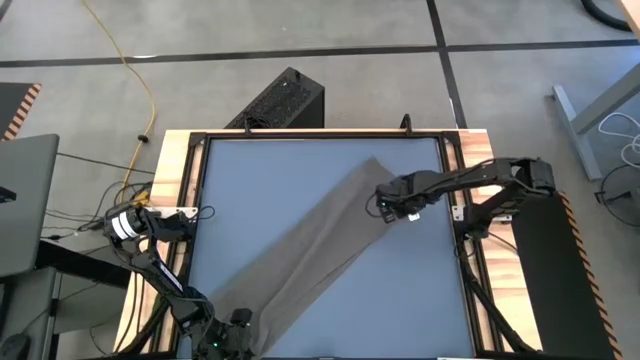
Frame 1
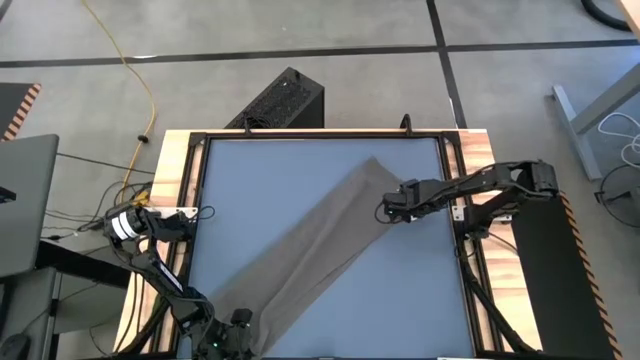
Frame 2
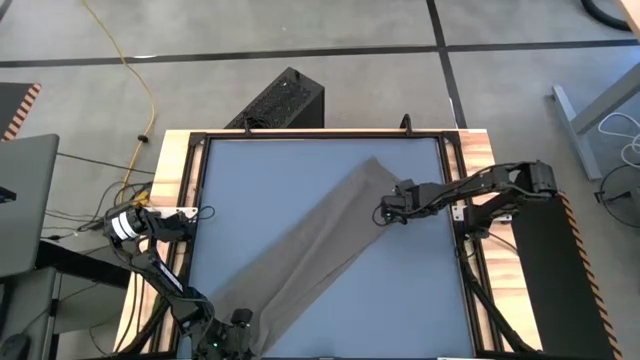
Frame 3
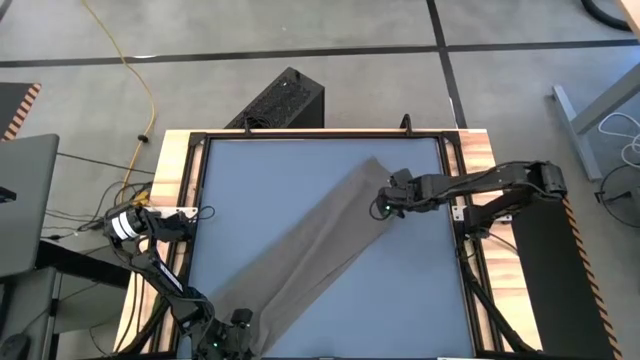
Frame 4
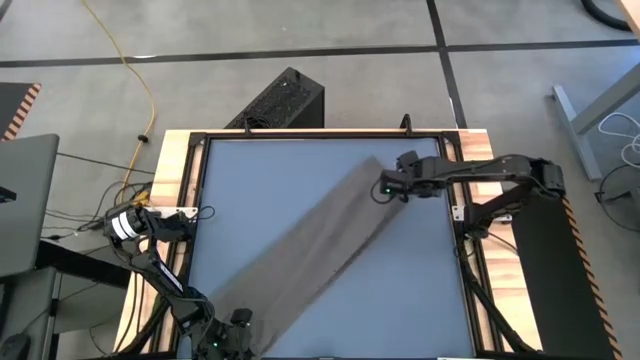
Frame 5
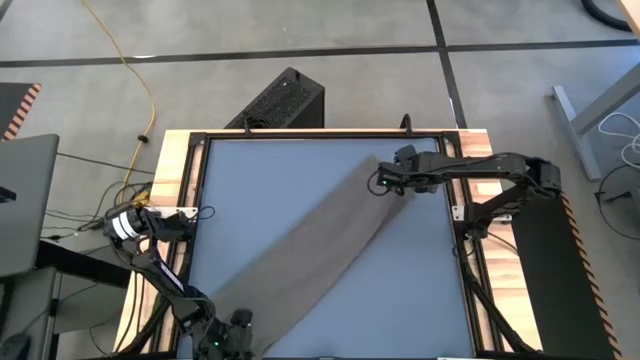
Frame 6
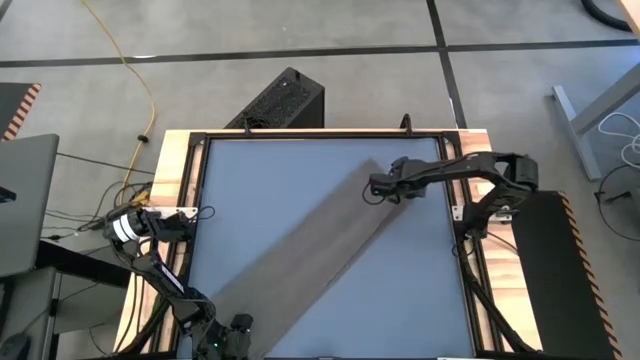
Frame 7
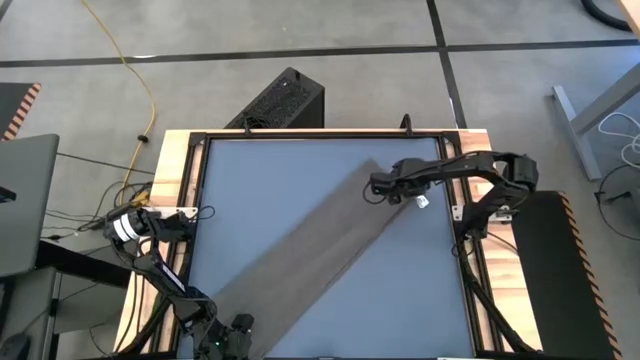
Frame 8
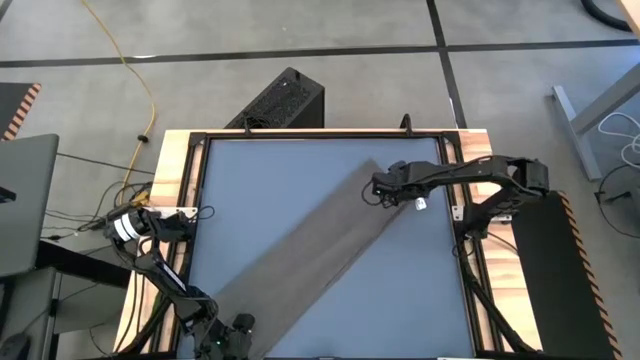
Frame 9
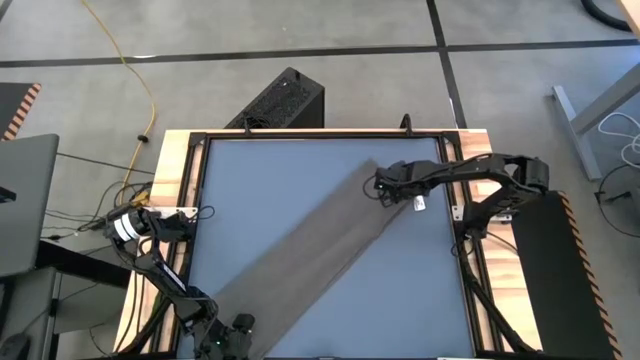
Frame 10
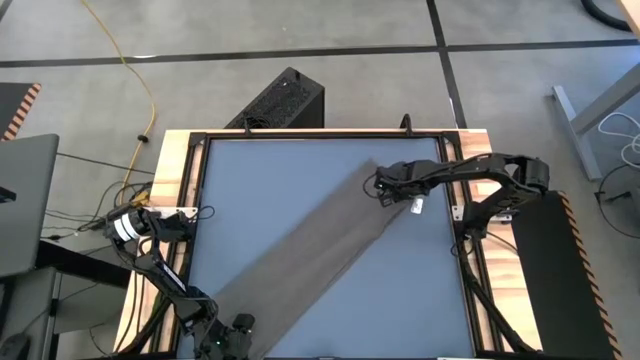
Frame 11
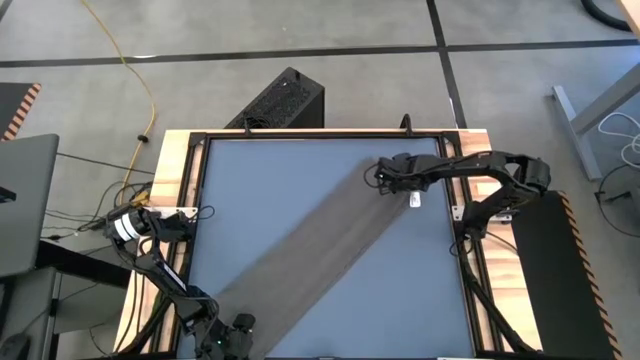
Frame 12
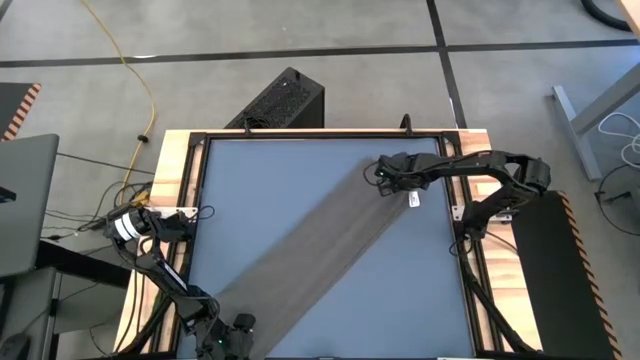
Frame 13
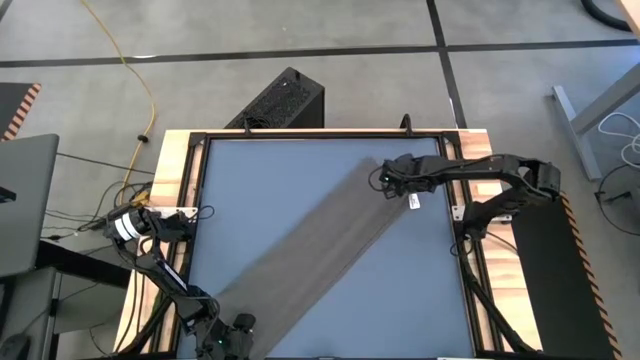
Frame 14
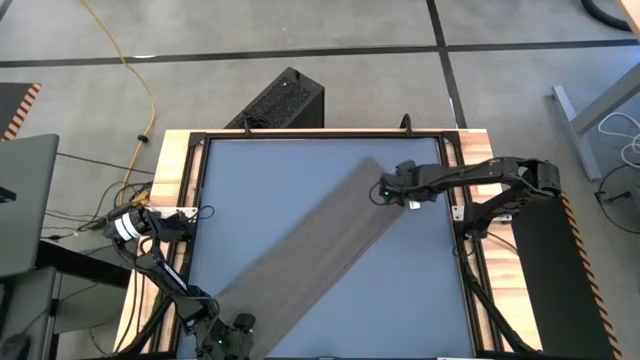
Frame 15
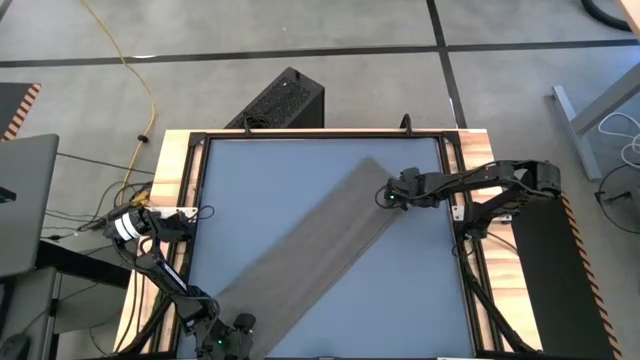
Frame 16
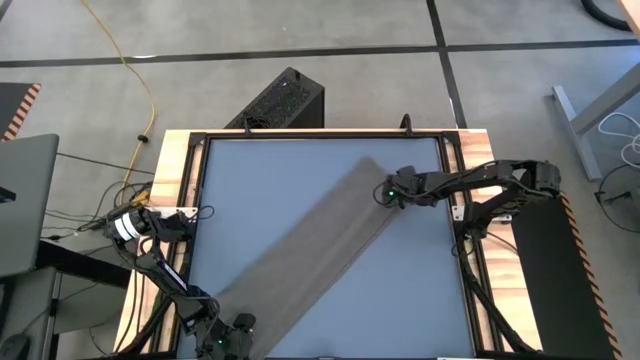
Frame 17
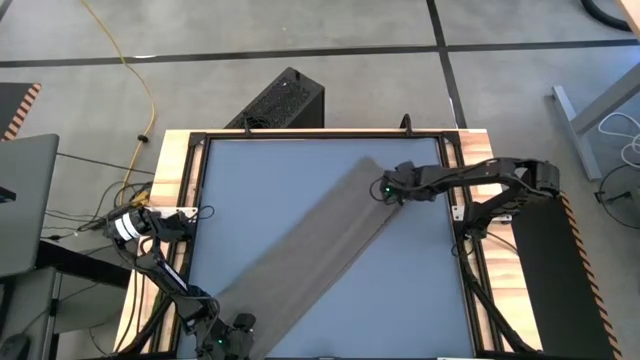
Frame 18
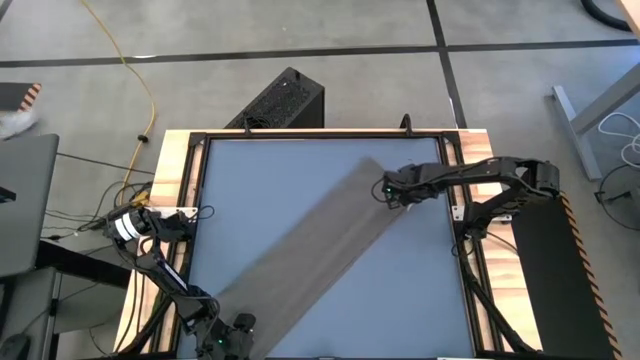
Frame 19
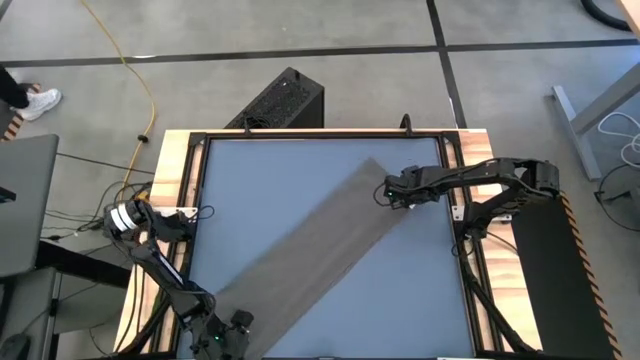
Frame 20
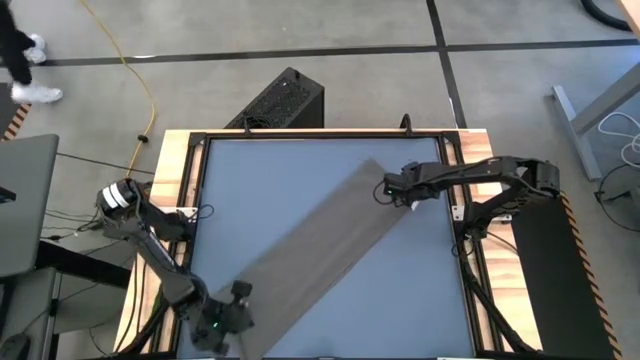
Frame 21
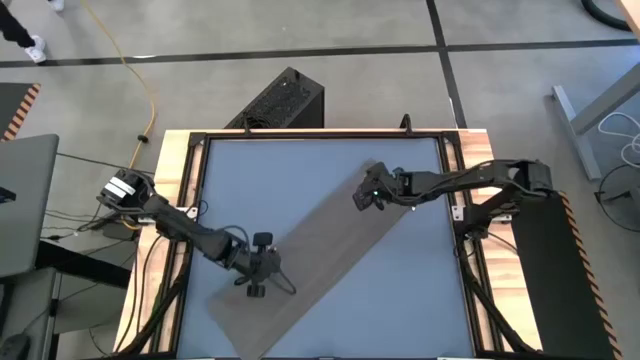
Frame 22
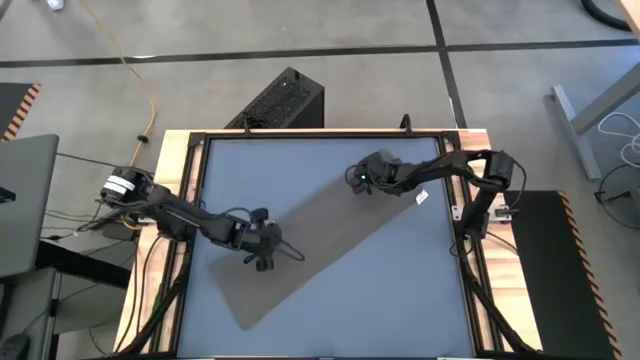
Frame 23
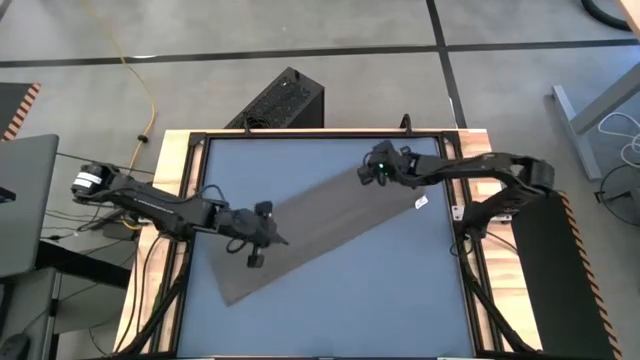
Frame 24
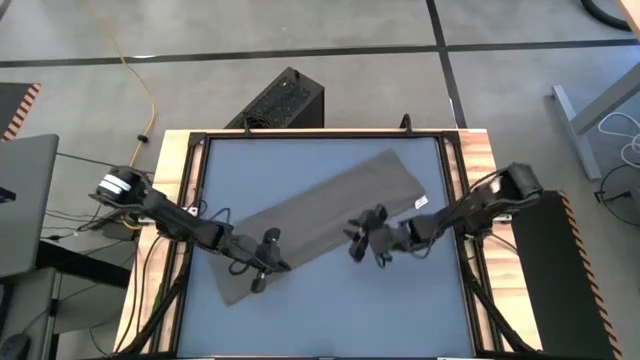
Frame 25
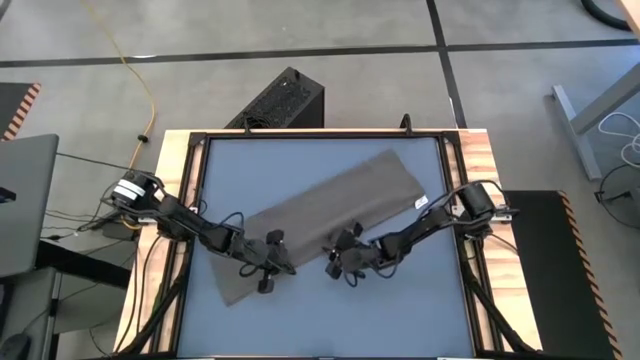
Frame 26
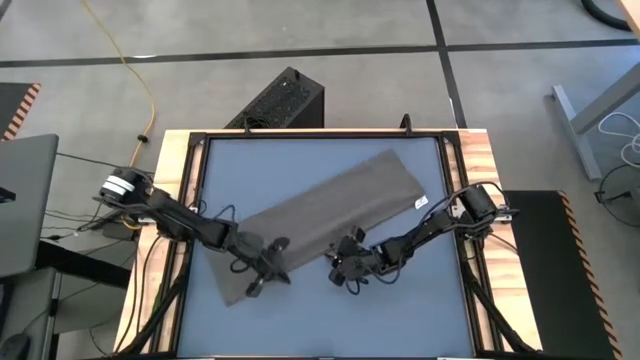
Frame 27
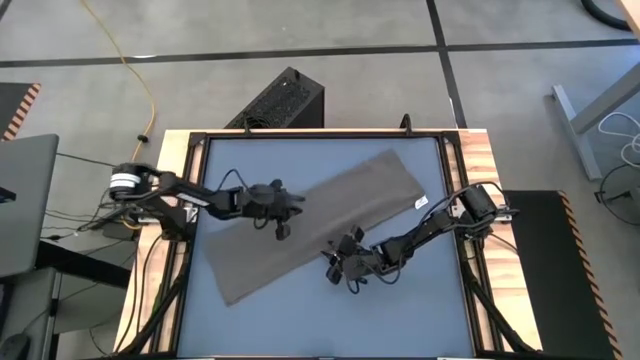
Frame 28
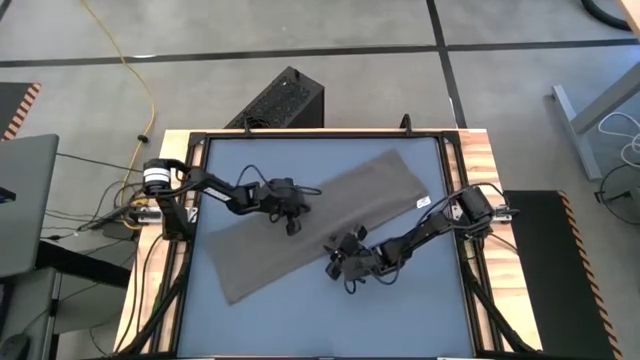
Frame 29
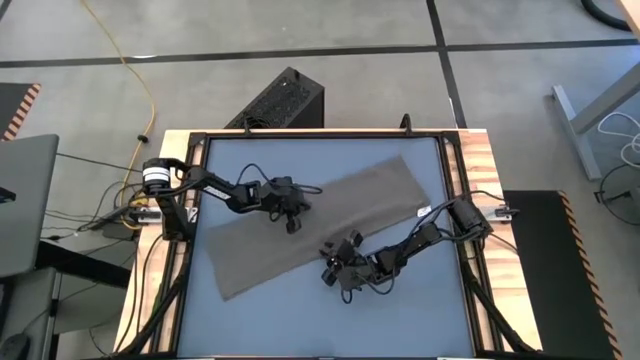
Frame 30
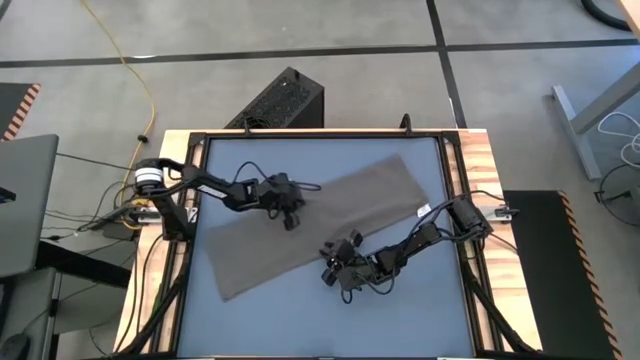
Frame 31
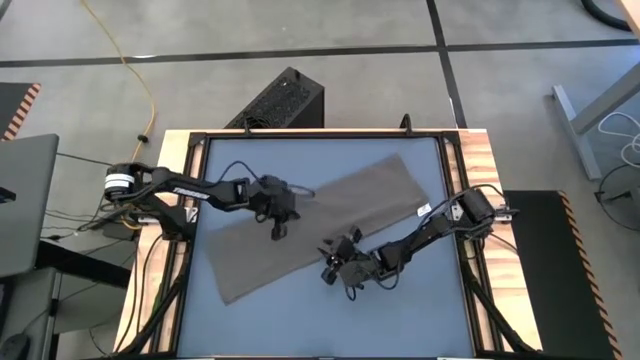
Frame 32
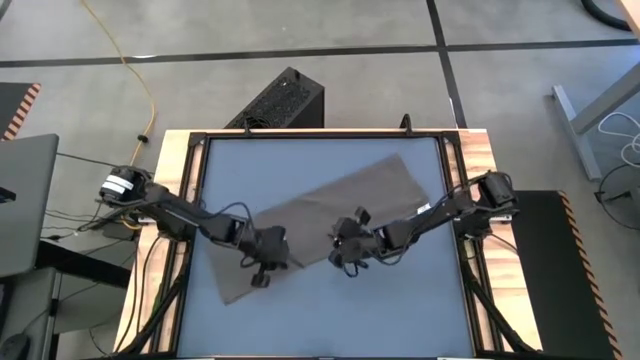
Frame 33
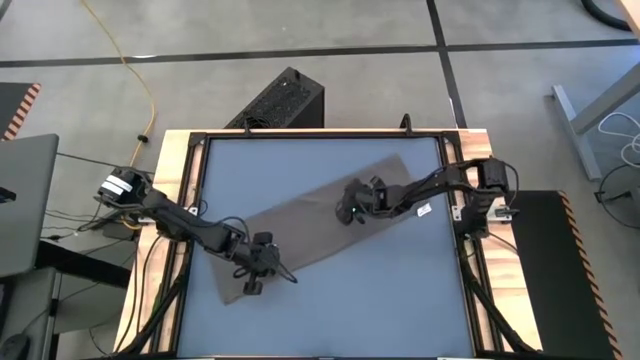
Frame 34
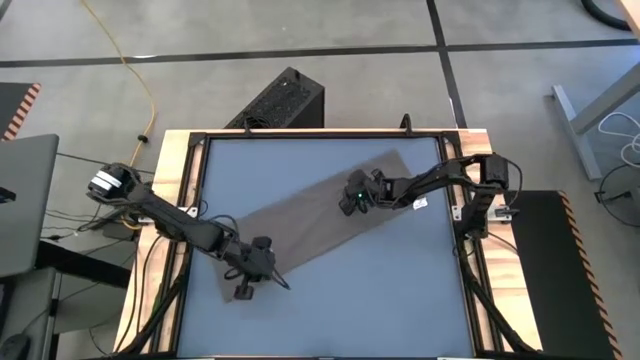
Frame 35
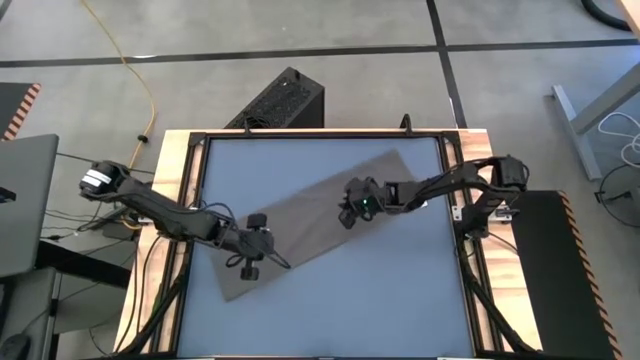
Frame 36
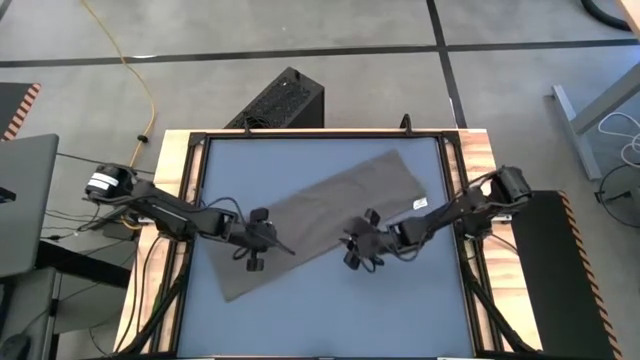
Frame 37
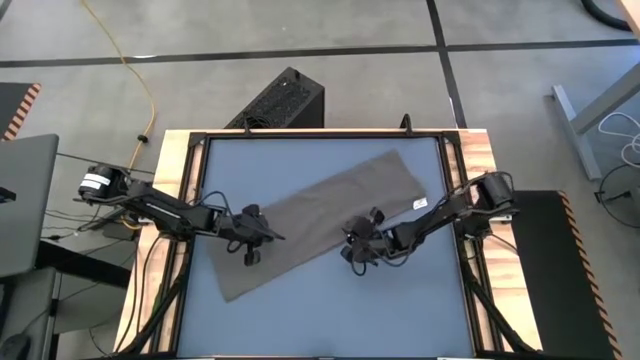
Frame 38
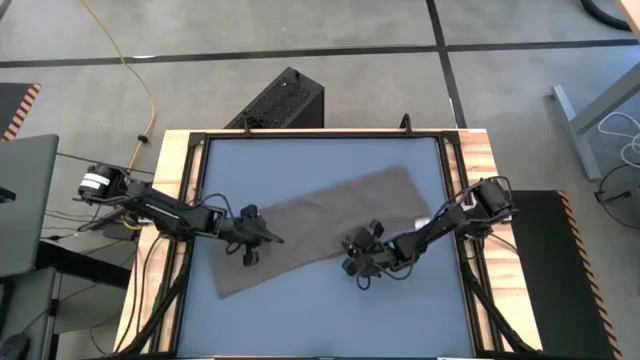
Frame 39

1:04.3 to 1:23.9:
Task: Roll towel
Roll the gray towel

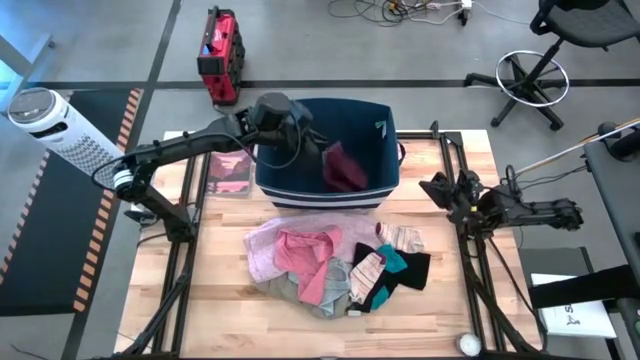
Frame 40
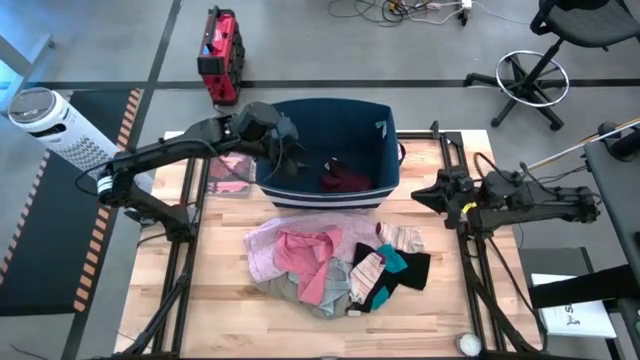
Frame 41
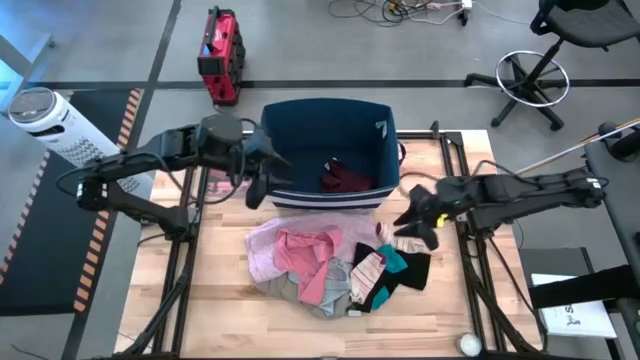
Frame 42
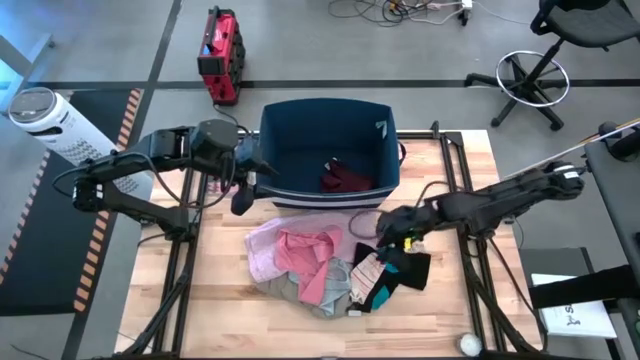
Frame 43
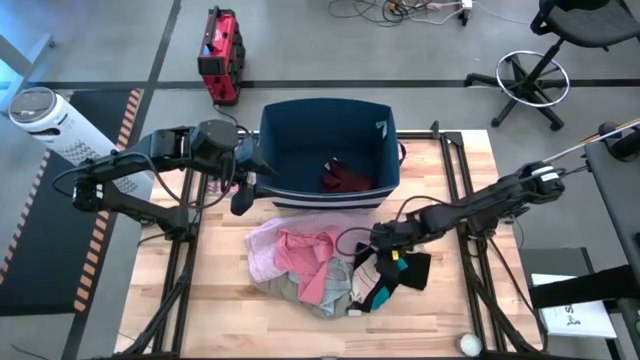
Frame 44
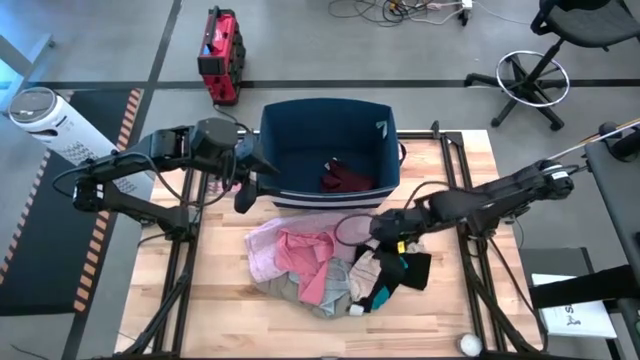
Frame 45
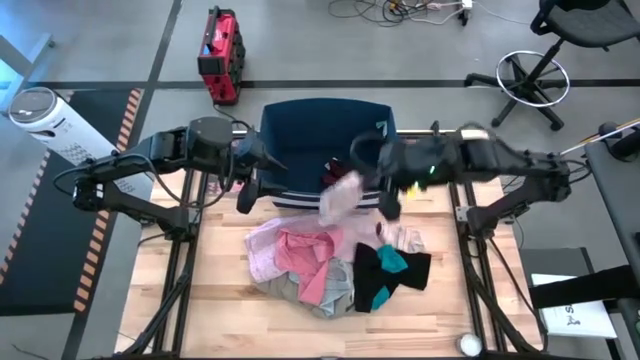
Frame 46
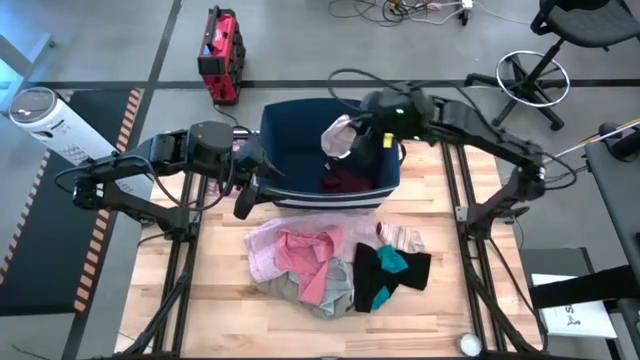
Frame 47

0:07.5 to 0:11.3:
Task: Sort clothes
Put the white sock into the blue laundry bin
